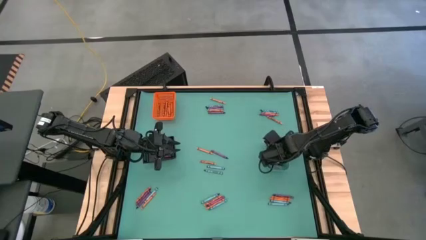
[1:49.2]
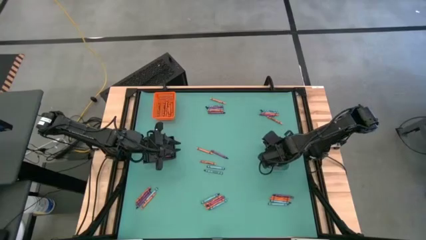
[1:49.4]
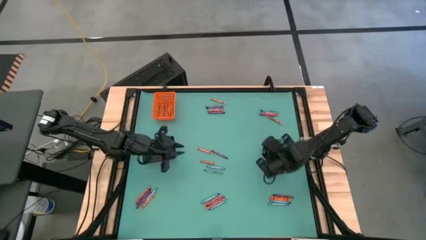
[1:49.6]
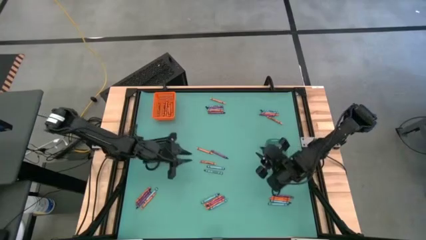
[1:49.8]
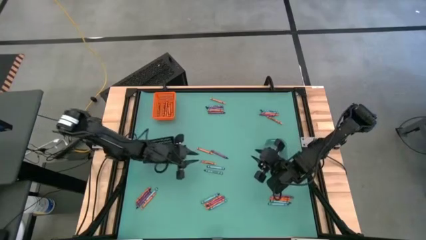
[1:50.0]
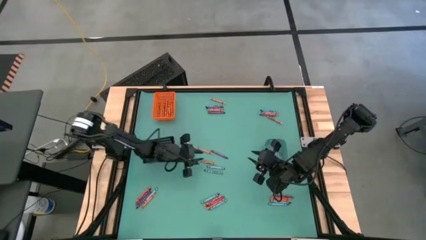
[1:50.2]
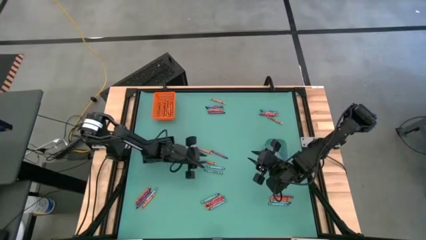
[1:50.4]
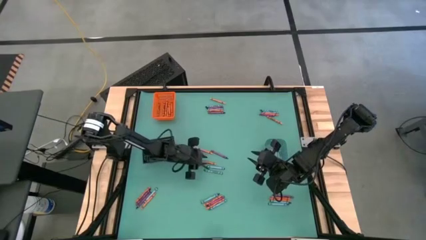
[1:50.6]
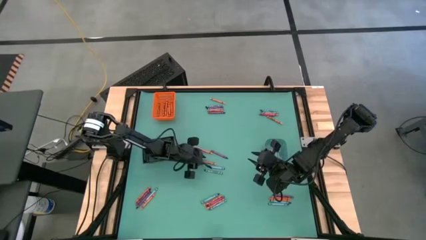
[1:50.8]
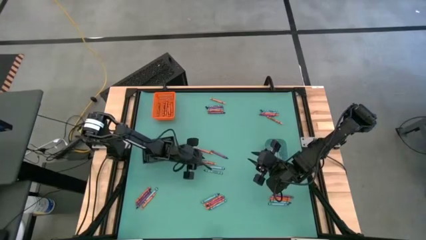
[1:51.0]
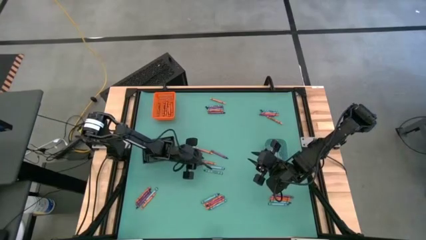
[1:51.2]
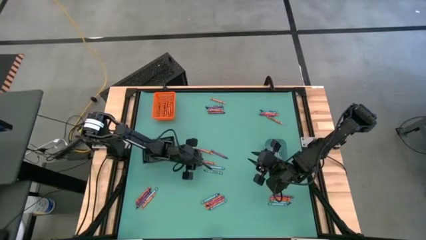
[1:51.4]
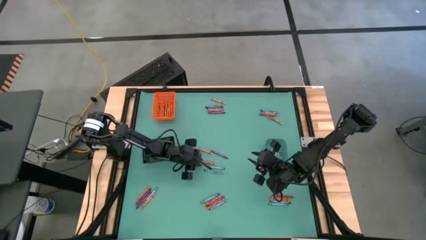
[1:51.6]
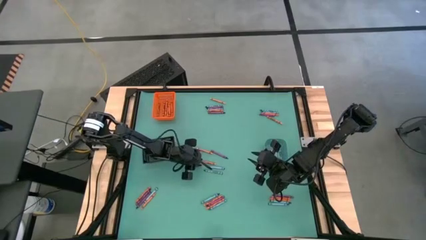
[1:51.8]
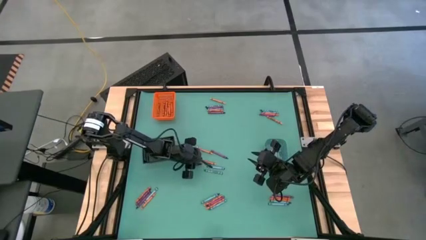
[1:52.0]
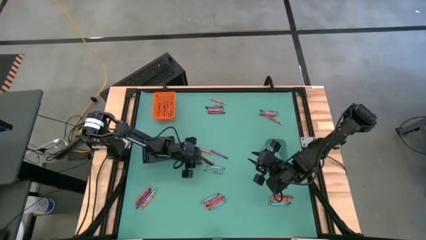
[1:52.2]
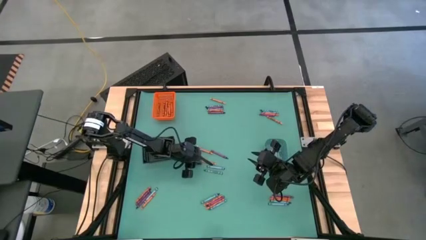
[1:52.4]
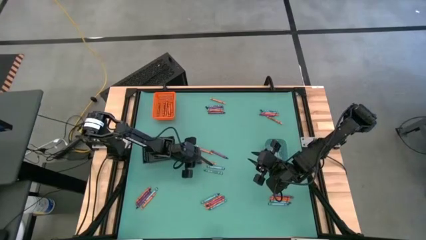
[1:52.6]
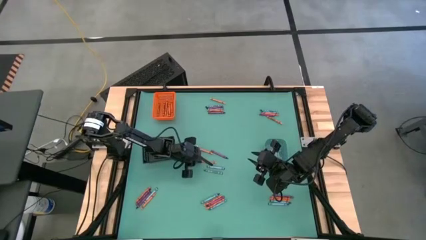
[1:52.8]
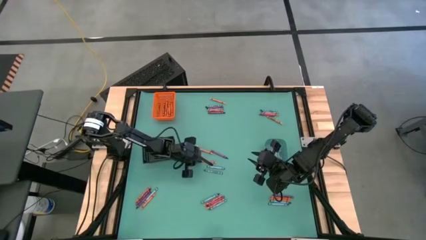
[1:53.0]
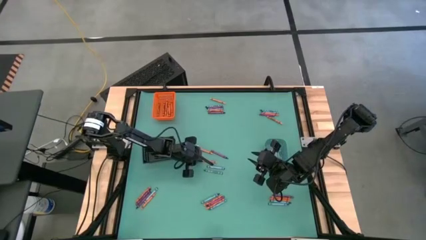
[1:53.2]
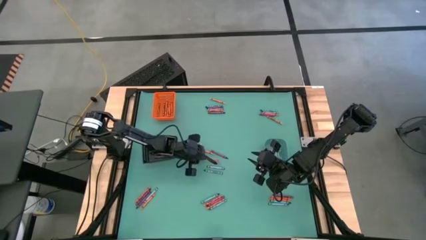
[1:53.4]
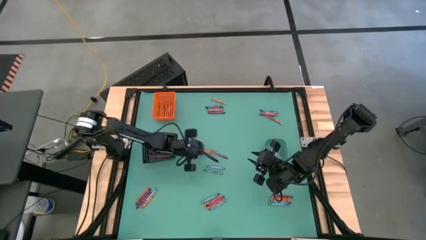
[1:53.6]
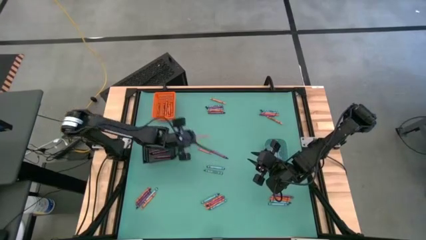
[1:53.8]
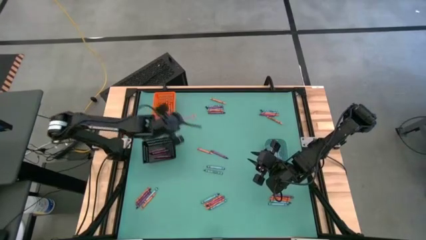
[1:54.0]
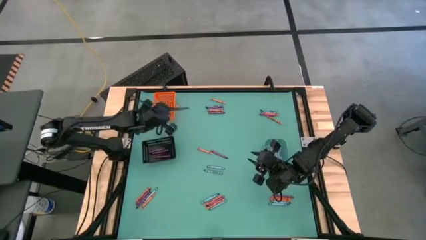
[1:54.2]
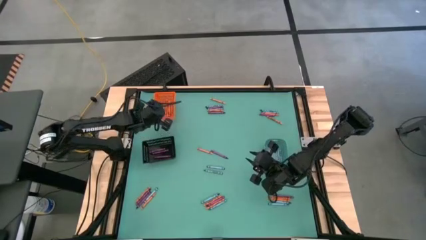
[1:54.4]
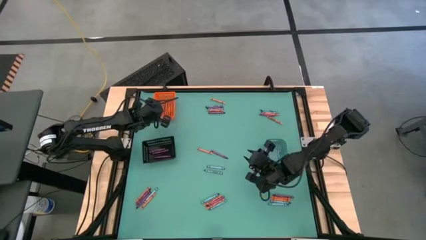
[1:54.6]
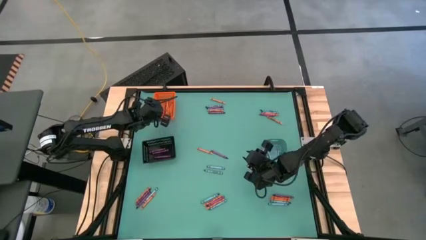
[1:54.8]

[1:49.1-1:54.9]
Task: Sort crayons
Put the orange crayon into the orange bin

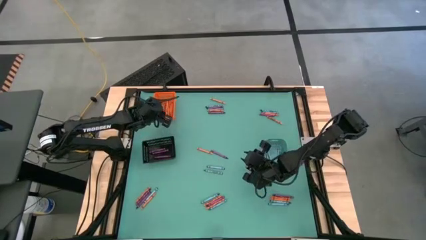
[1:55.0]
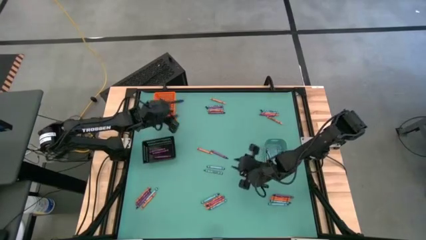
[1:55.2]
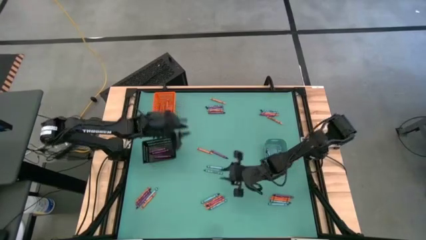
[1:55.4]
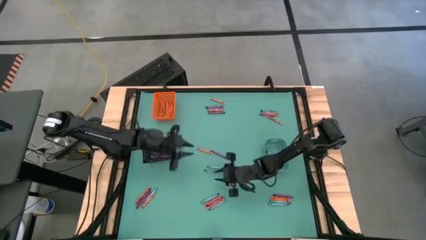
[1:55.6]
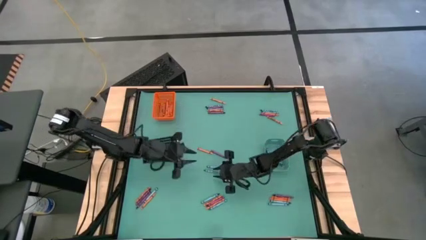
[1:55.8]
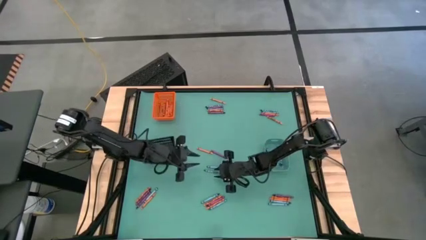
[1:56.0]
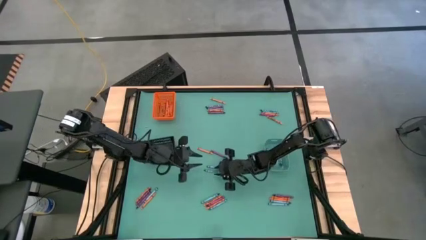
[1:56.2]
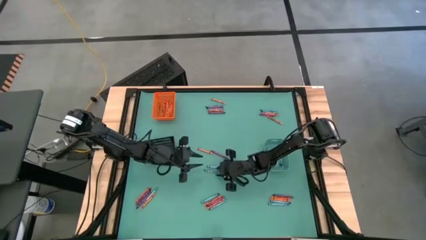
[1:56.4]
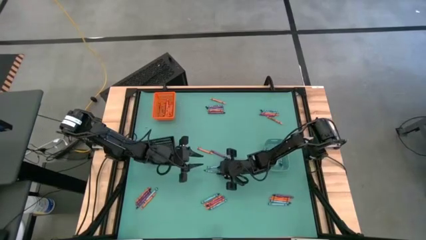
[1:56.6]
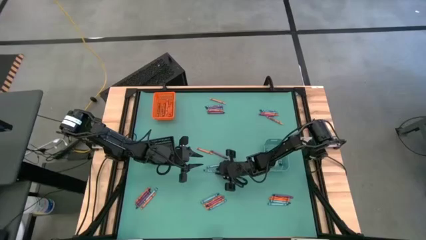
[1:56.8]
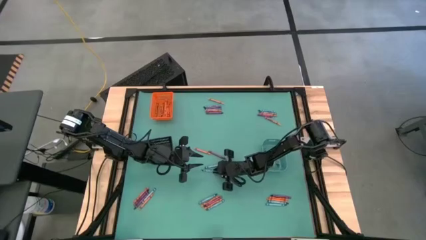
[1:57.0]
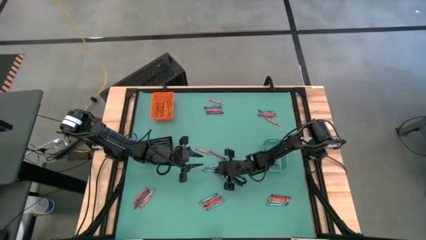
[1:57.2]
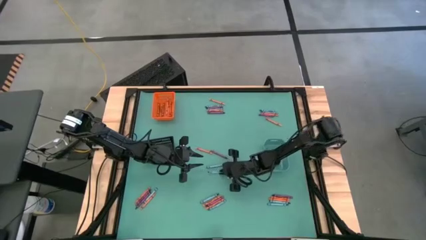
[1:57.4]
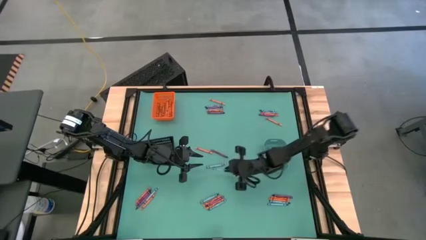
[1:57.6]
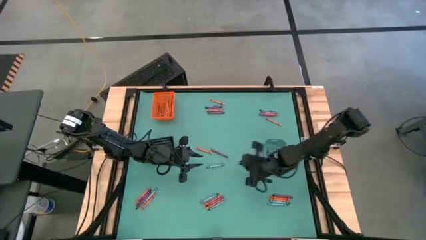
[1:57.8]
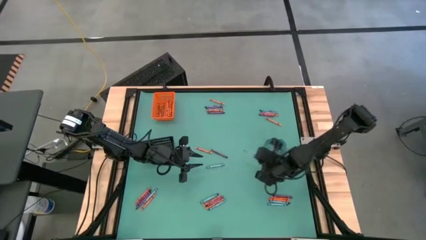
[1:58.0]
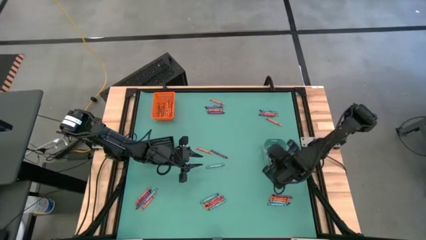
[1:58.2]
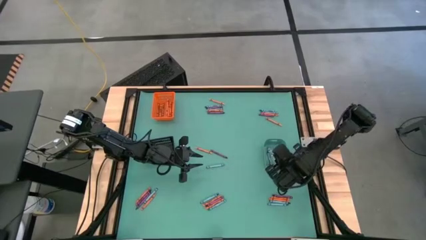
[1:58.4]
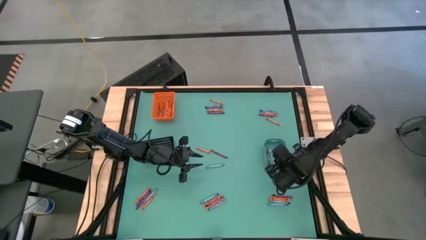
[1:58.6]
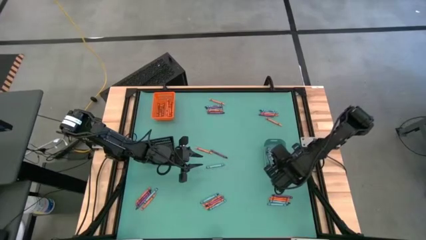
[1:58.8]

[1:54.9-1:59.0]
Put the blue crayon into the blue bin

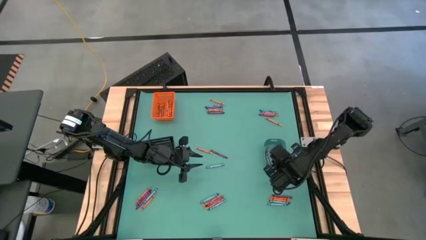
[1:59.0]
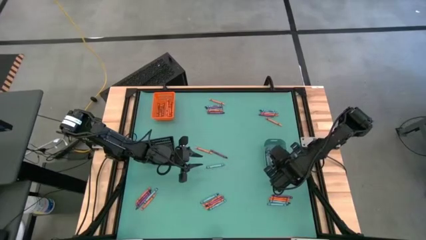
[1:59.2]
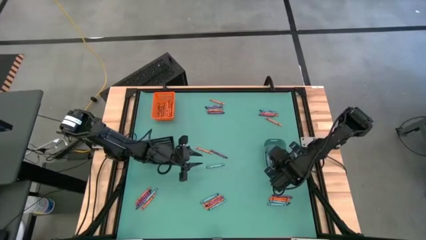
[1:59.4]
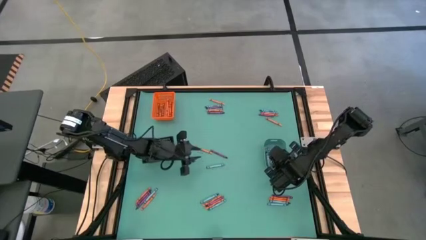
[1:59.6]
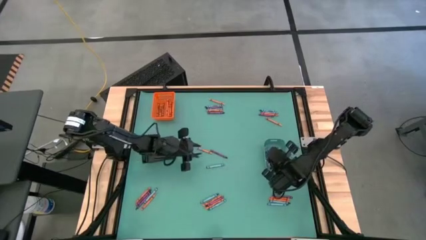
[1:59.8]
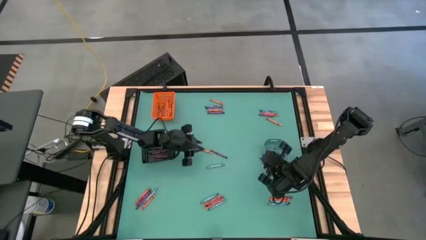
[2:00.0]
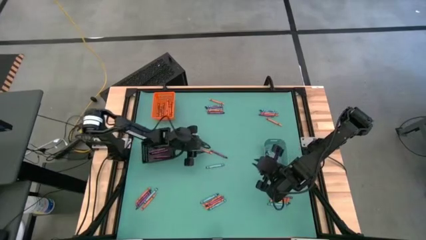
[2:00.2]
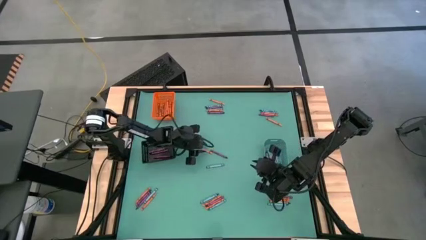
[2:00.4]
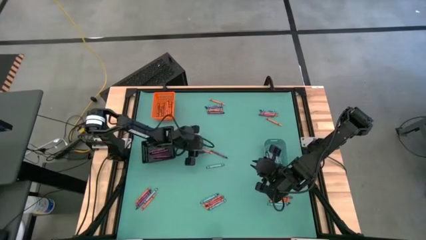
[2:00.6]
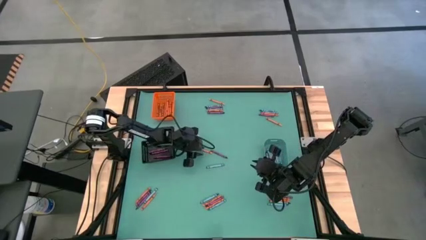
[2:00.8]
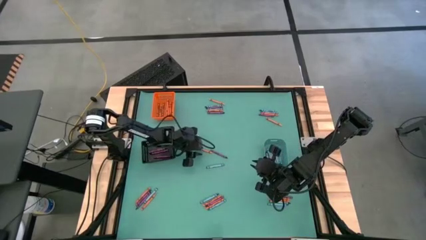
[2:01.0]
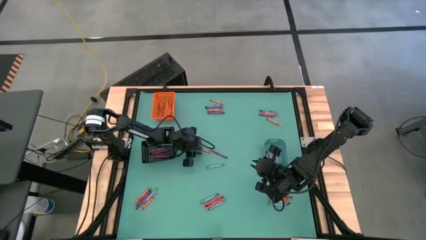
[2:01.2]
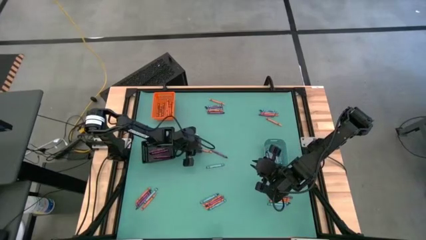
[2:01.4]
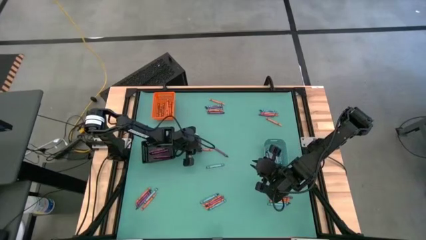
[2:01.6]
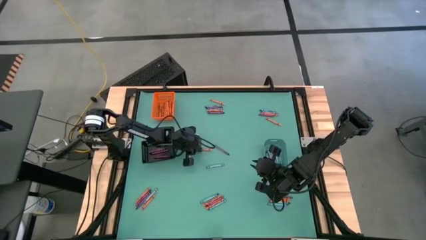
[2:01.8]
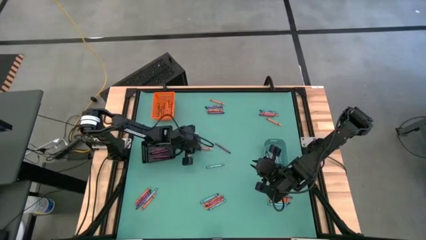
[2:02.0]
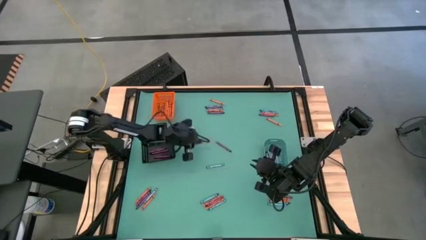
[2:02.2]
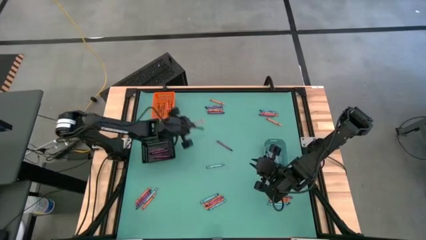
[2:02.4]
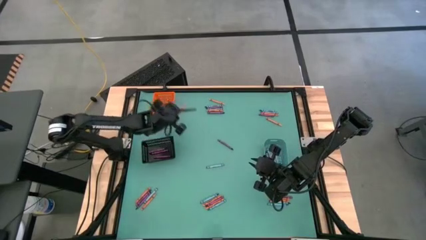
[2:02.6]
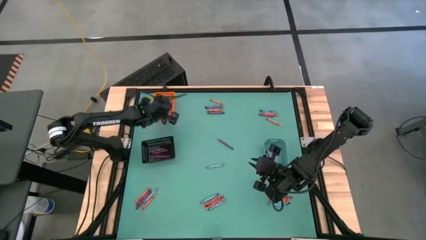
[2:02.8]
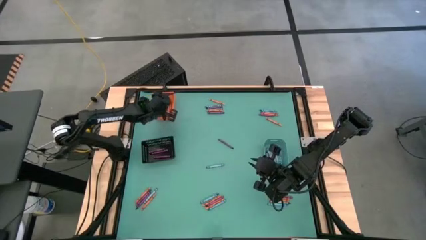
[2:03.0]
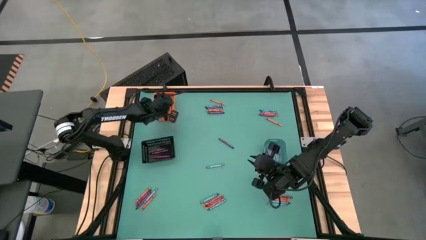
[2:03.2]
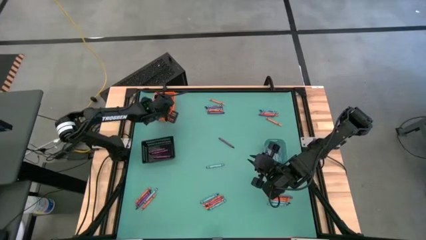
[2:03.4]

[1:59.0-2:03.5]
Put the orange crayon into the orange bin

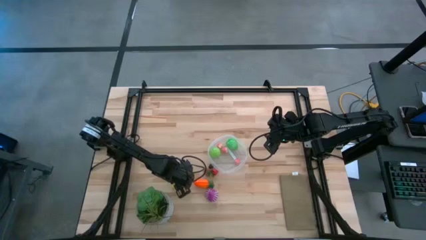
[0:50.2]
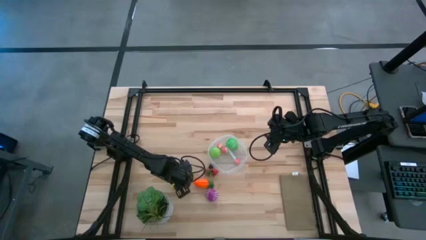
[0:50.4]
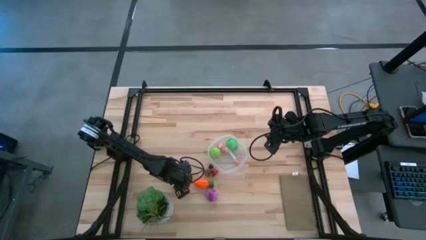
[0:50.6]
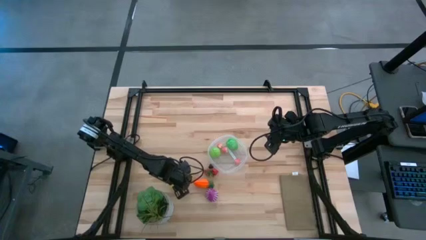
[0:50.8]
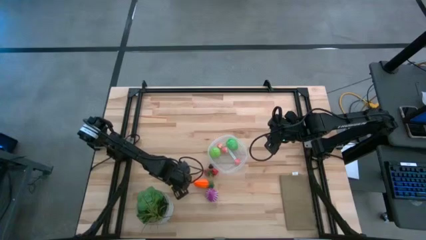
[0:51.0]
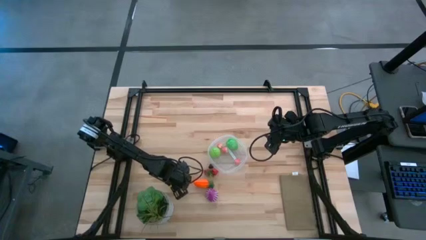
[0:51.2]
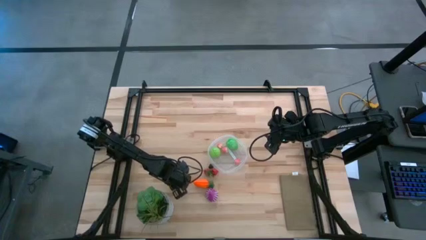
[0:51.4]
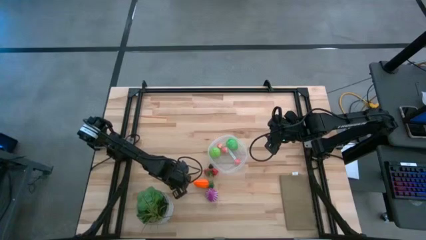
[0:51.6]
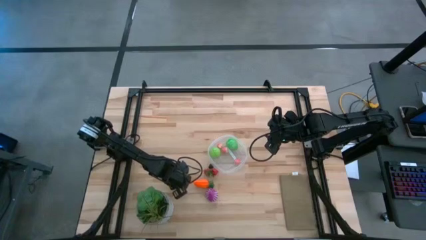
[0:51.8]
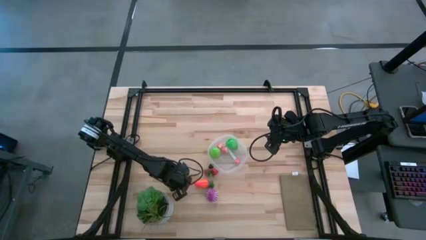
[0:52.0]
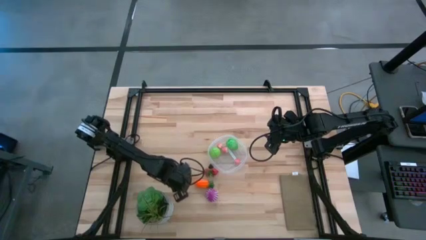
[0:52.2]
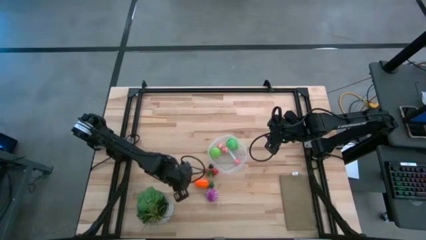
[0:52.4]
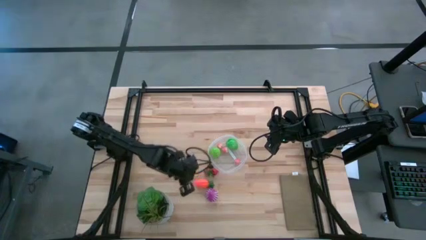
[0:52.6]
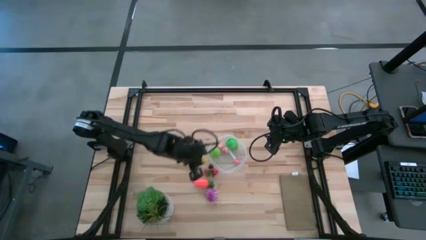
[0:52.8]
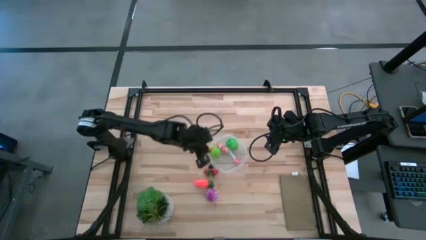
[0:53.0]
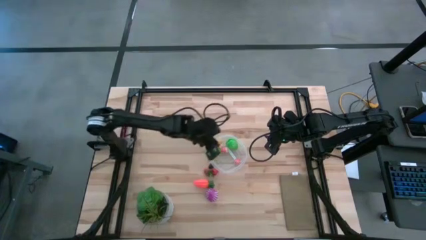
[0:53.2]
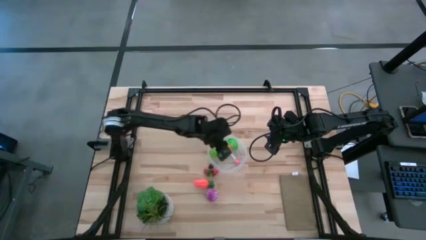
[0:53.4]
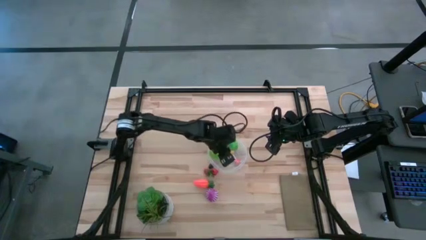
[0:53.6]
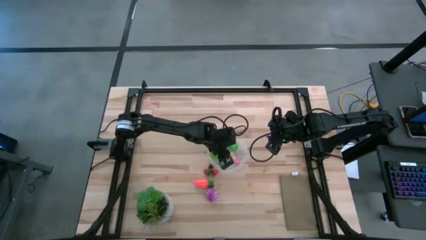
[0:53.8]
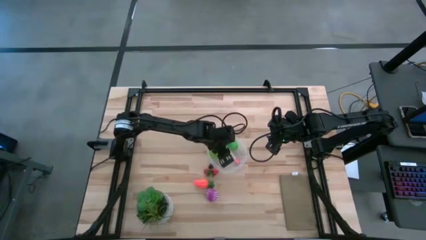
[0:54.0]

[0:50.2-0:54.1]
Task: Pick and placing Produce into tupperware
Put the yellow corn into the transparent bin
